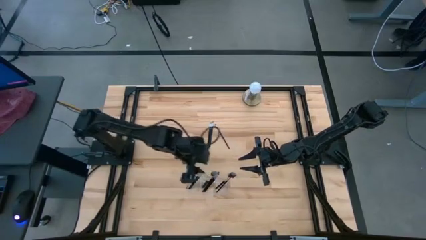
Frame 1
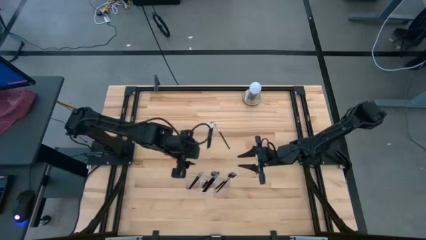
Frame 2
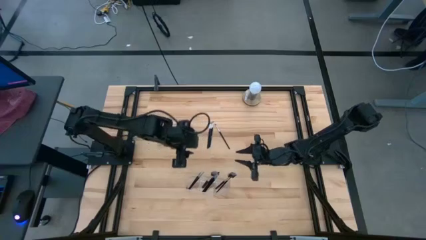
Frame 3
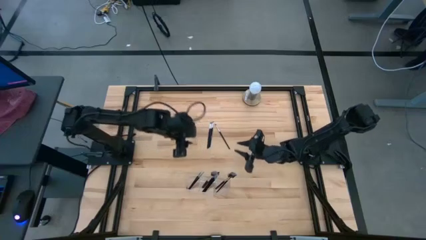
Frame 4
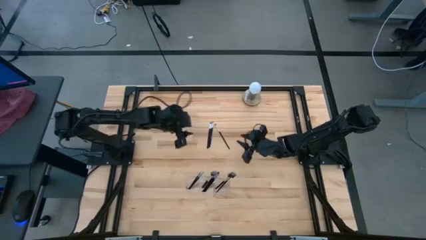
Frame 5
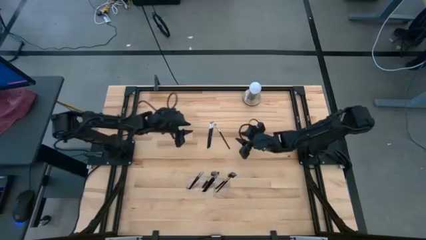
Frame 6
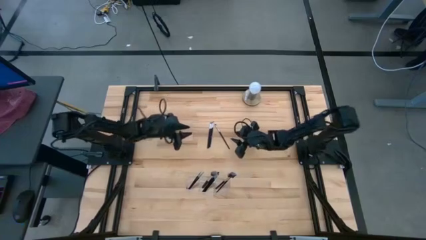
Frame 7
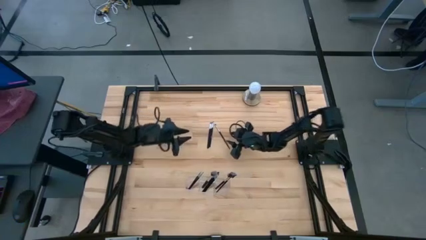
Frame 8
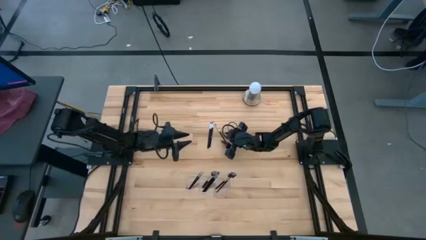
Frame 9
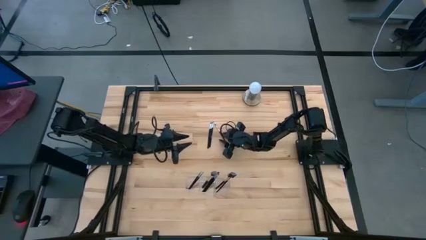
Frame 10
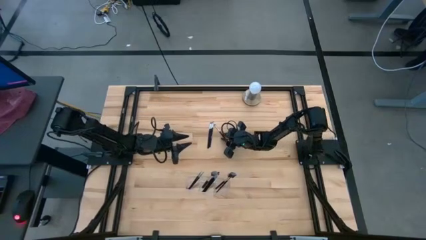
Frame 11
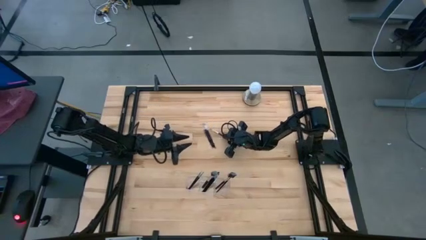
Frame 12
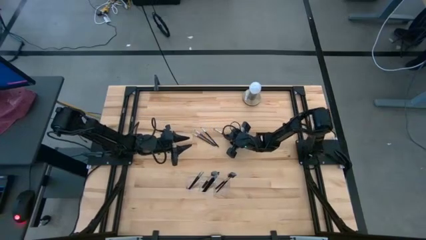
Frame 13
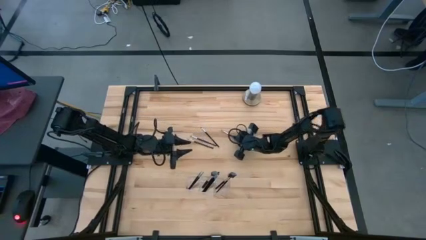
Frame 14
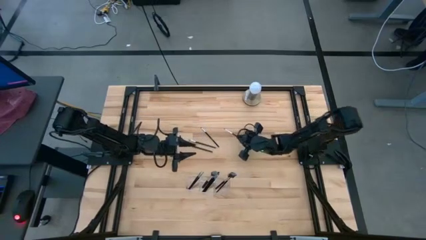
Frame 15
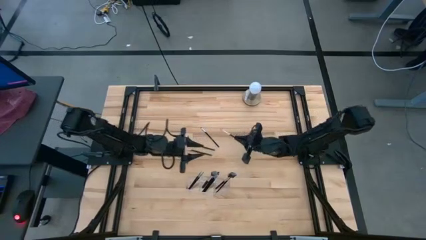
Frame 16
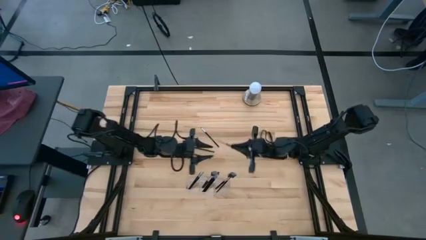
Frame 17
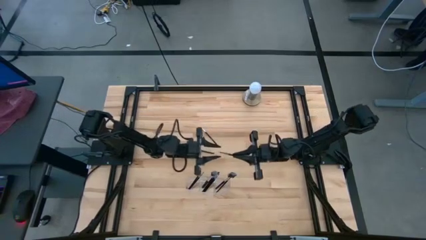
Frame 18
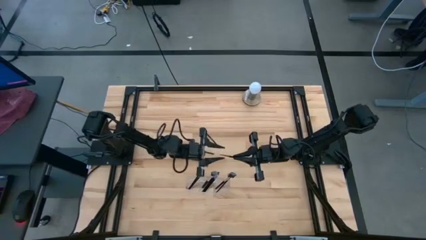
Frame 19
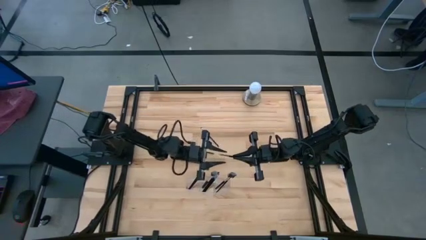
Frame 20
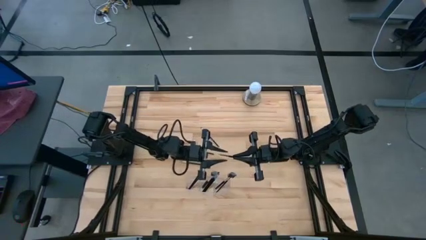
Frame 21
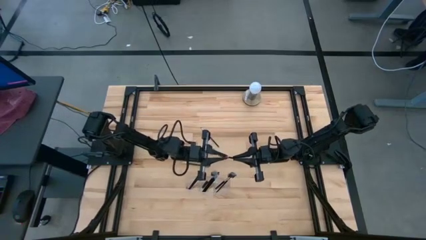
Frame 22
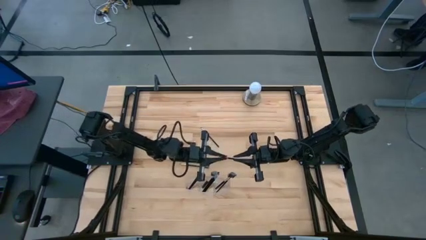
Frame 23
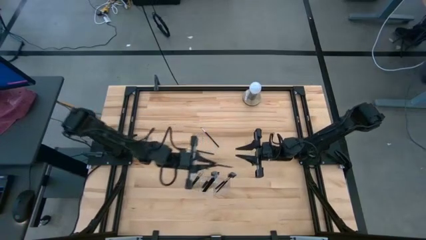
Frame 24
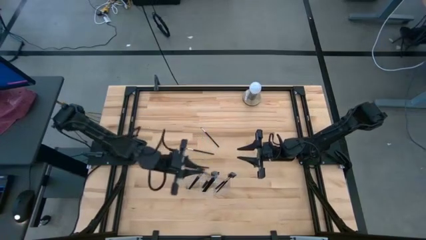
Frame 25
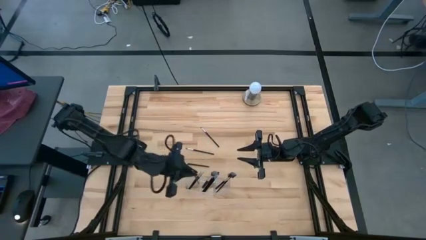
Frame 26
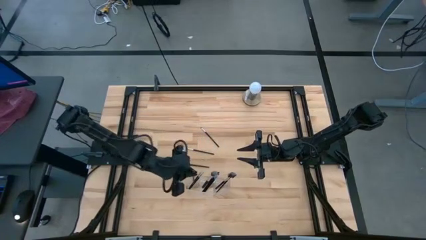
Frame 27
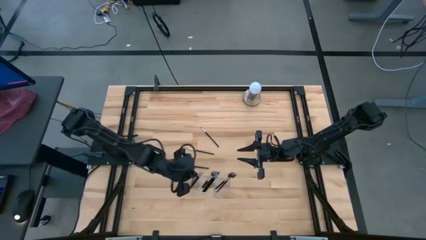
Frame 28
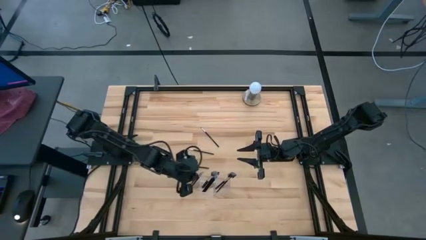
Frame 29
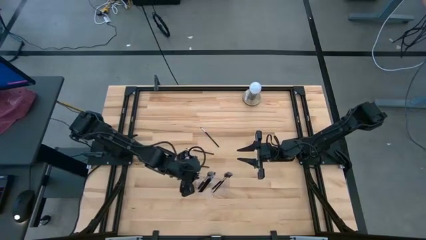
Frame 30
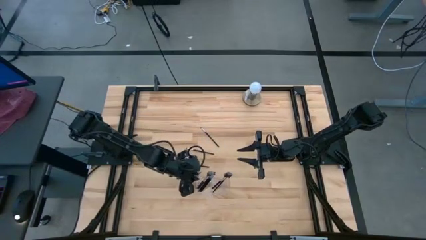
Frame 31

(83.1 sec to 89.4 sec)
Task: Put items in baskets/containers
Put the black eyeshadow brush into the transparent organizer

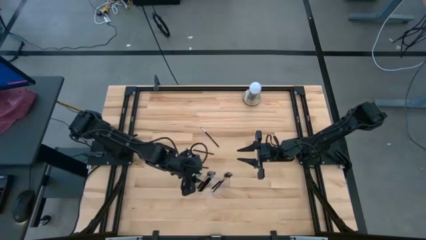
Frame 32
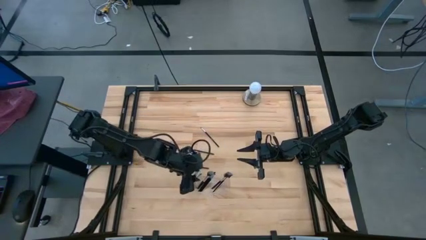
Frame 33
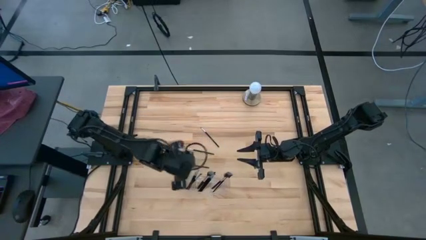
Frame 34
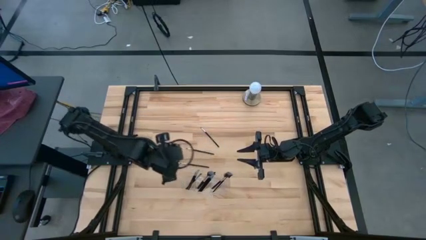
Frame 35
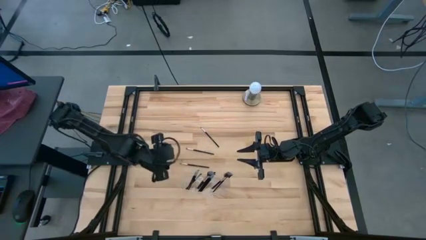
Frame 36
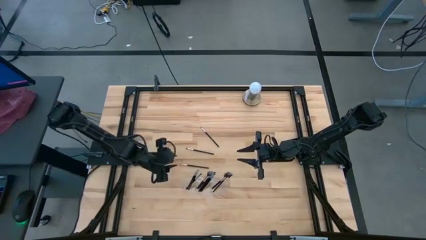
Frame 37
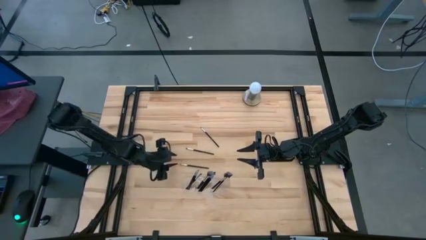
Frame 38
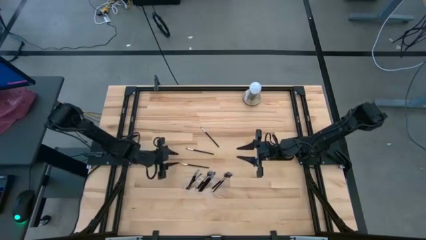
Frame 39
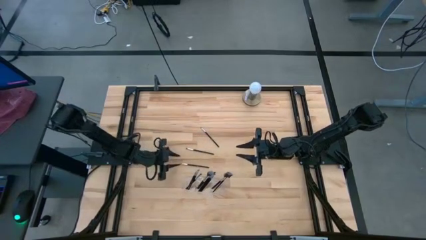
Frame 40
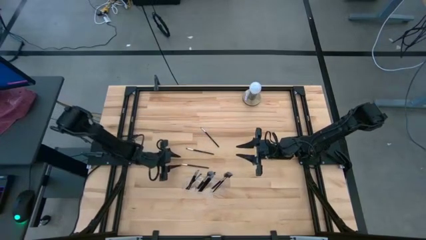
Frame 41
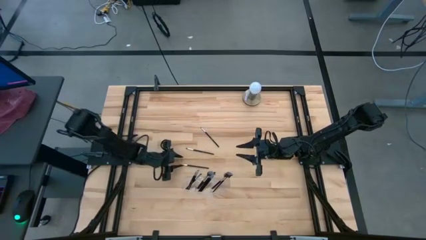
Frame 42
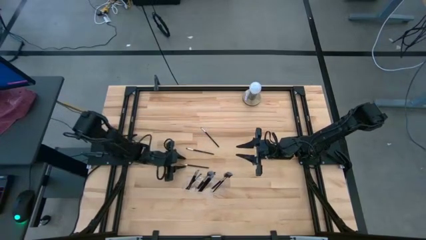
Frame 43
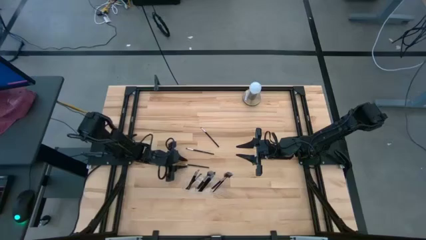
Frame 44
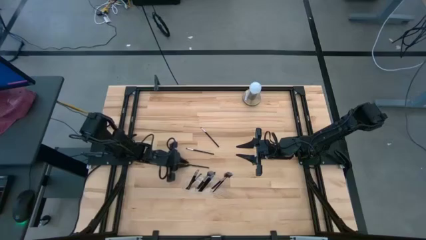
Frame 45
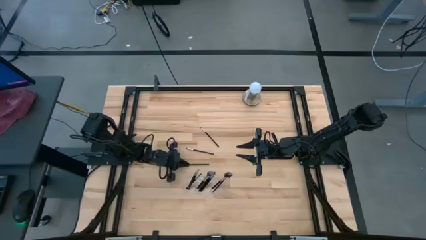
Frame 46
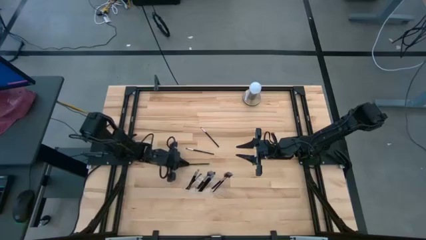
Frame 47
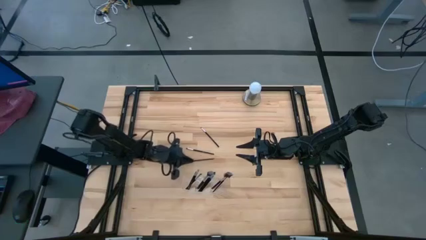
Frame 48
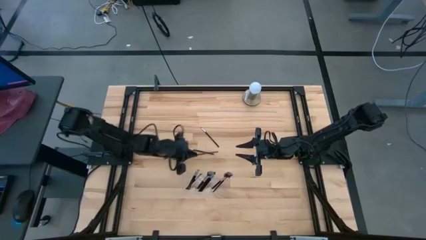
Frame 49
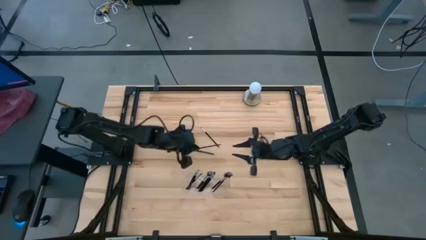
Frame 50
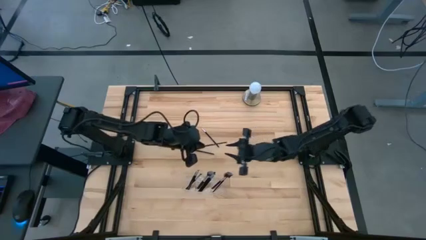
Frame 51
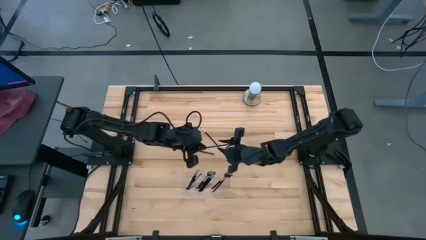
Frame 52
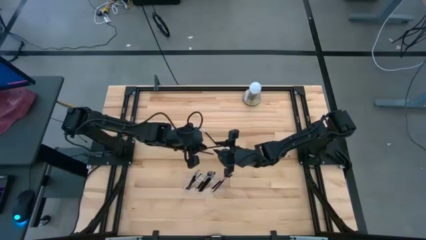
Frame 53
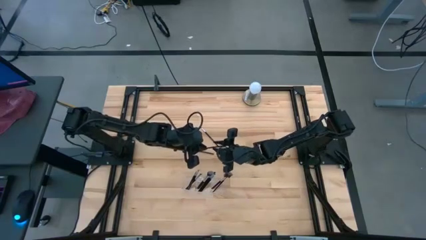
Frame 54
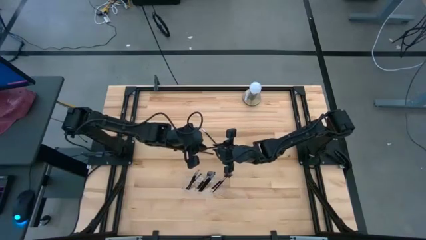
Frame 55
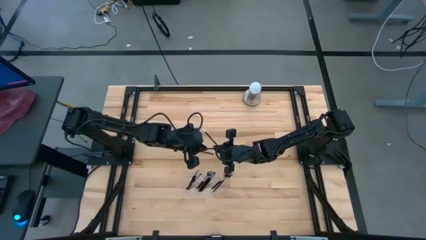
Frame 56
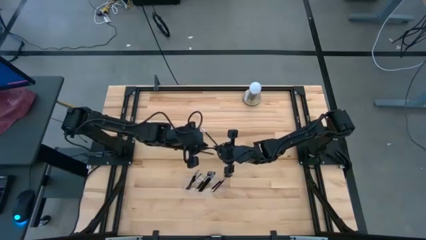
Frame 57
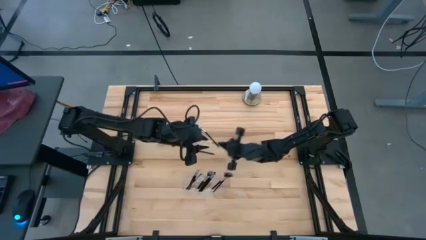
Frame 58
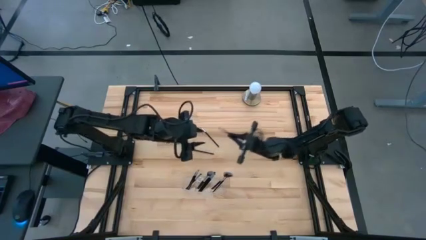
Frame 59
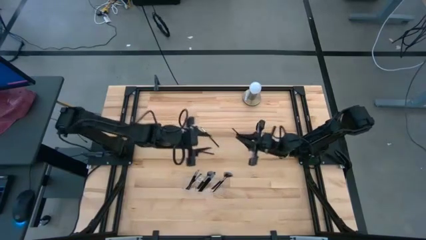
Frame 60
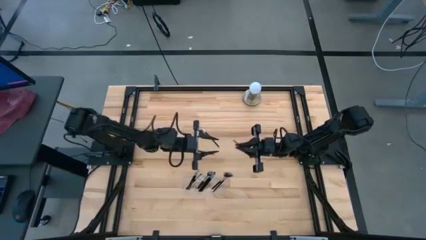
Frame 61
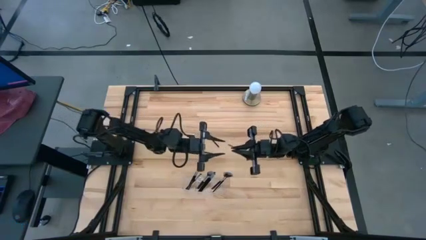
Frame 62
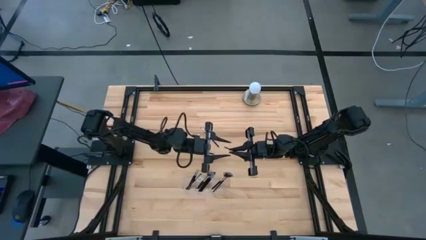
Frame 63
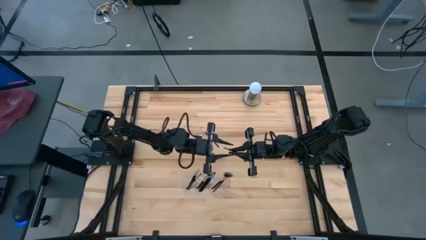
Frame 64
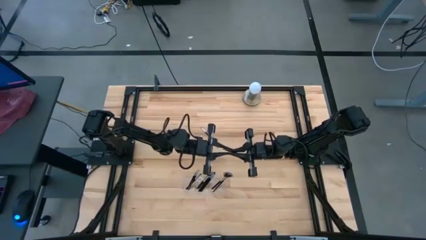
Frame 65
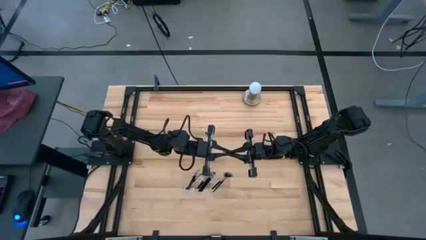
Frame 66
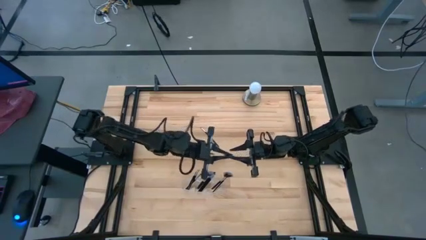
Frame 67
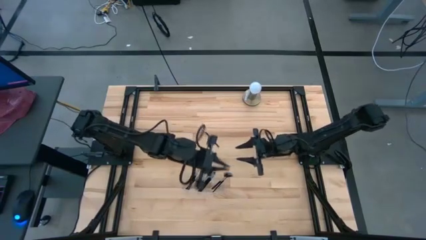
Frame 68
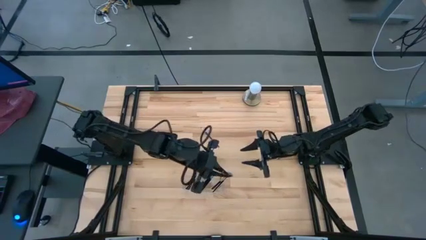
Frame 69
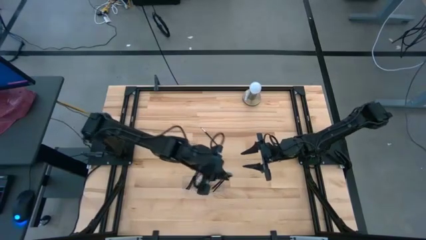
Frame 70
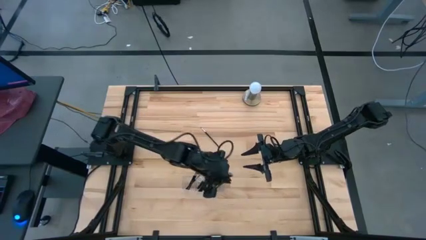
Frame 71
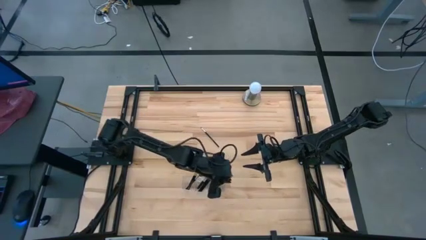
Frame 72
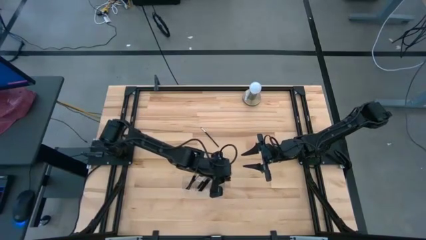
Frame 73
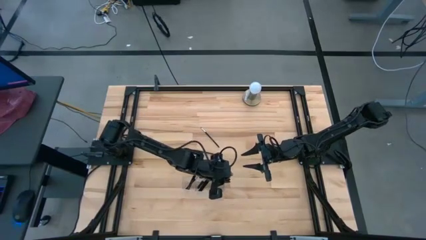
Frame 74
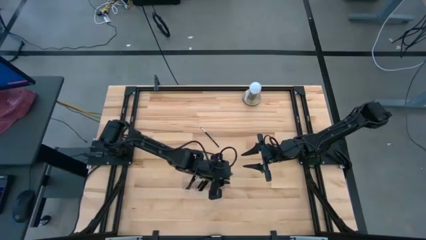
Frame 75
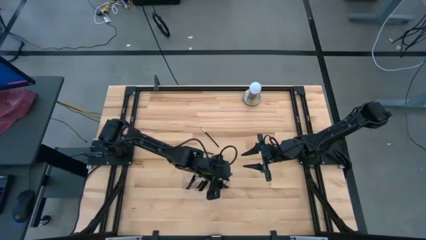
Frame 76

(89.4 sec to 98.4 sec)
Put the black eyeshadow brush into the transparent organizer

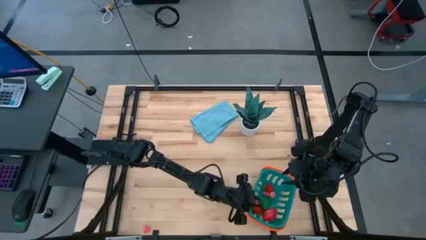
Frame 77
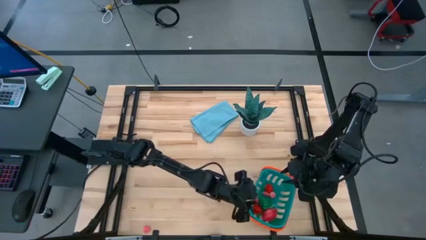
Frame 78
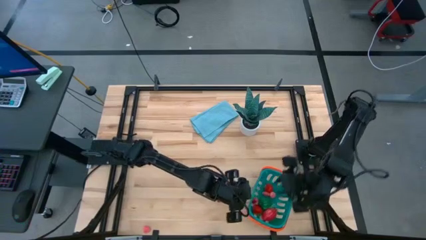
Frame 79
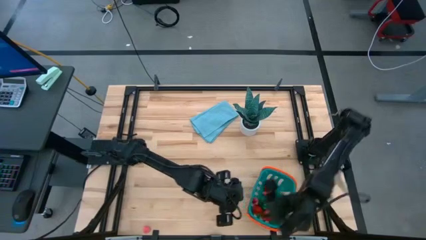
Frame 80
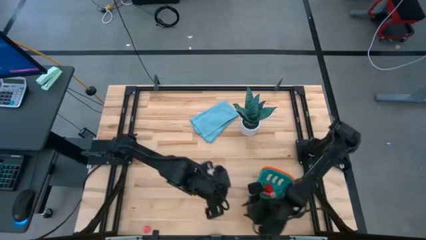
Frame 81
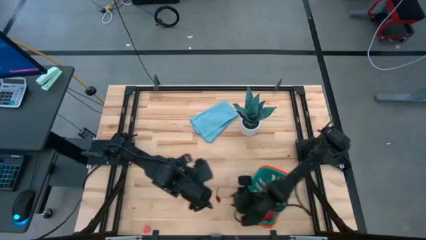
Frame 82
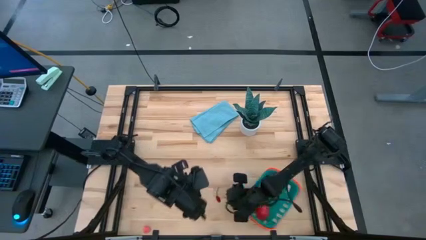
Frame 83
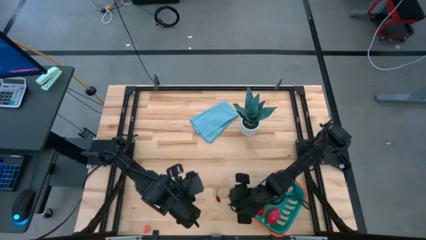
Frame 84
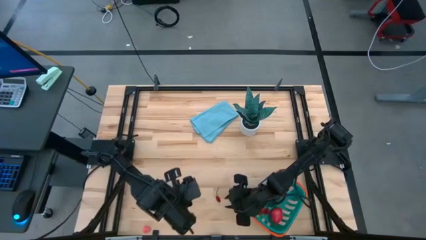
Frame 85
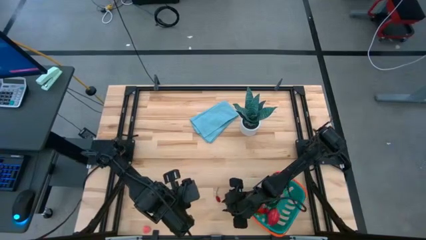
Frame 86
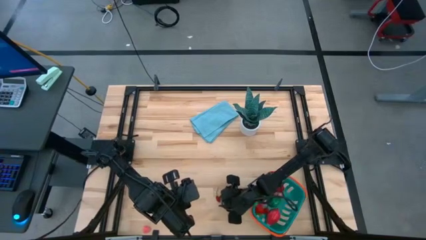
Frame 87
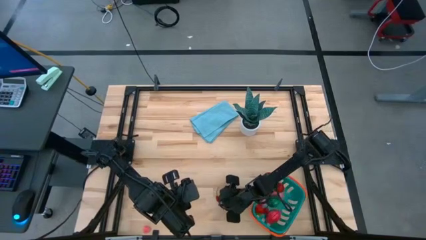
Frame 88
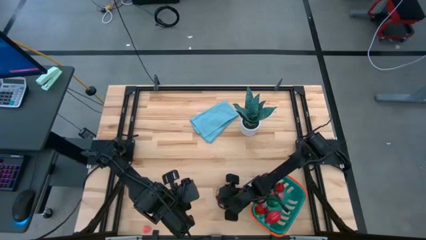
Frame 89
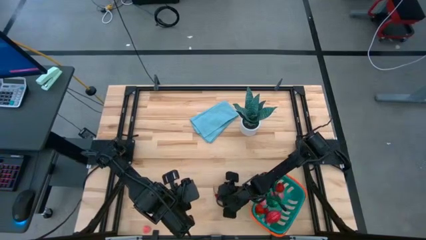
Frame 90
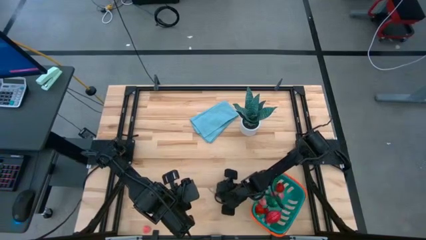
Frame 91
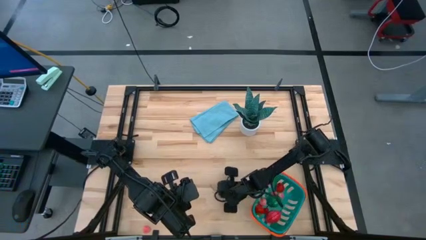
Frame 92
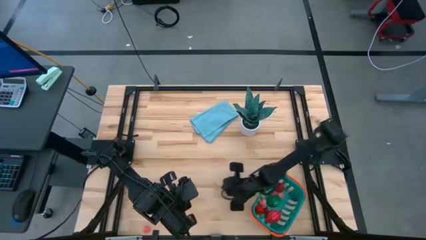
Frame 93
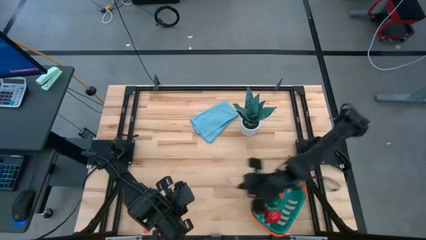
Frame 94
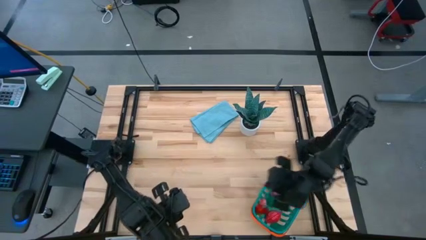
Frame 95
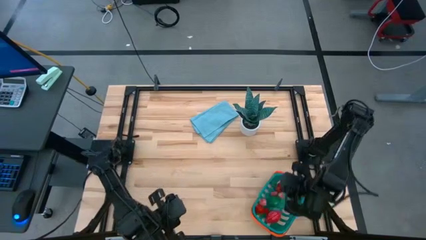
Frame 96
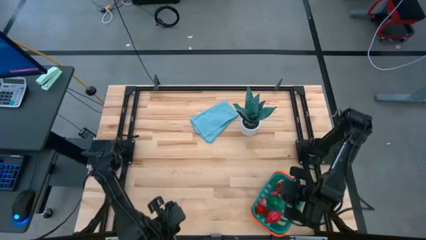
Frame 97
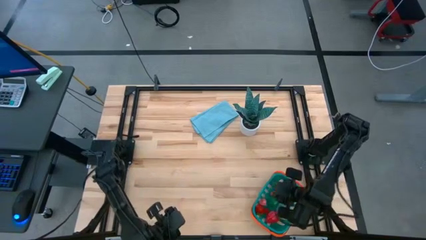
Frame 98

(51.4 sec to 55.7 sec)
Task: Pick and placing Produce into tupperware
Put the cherry into the basket
